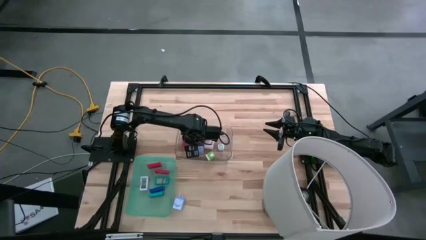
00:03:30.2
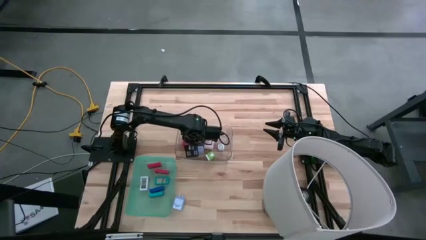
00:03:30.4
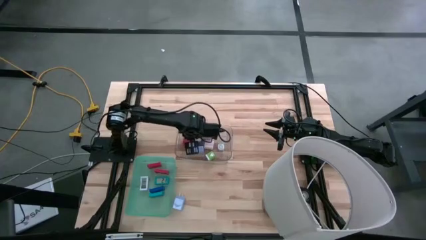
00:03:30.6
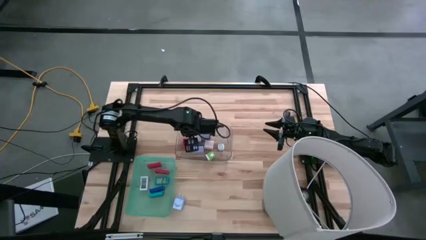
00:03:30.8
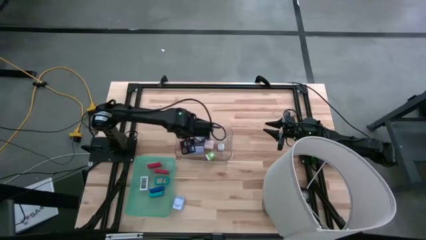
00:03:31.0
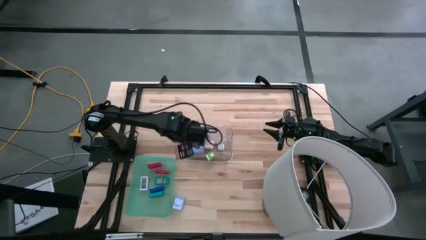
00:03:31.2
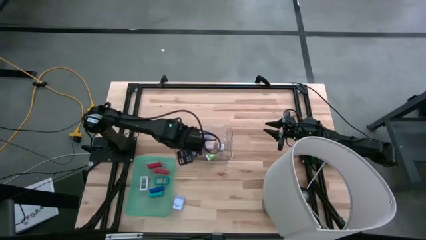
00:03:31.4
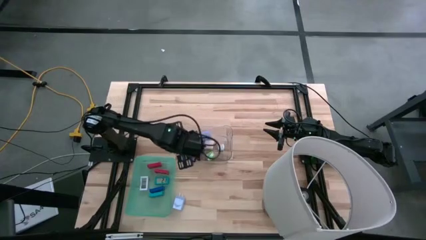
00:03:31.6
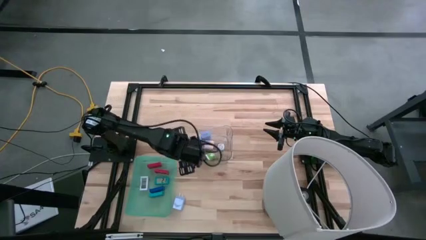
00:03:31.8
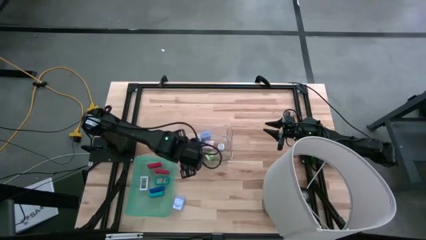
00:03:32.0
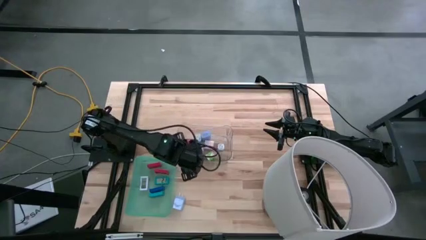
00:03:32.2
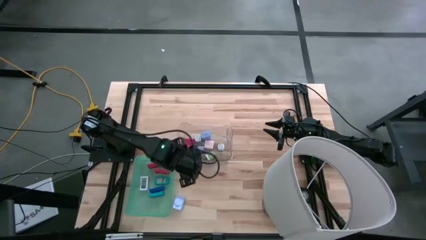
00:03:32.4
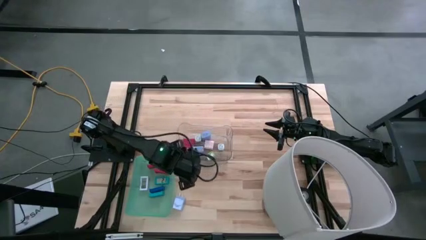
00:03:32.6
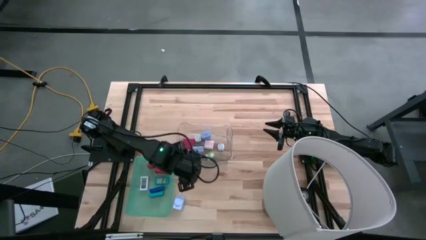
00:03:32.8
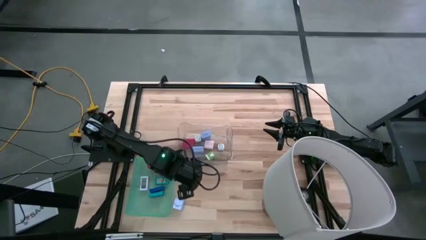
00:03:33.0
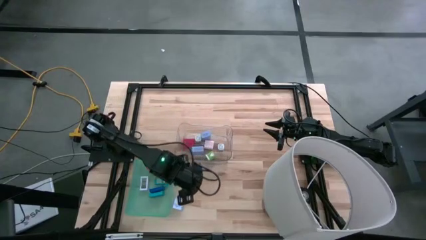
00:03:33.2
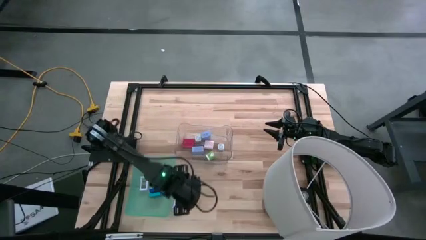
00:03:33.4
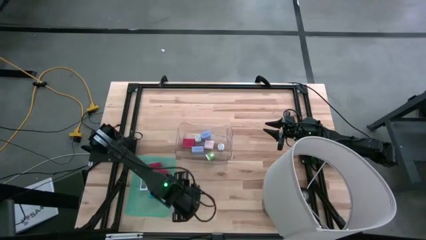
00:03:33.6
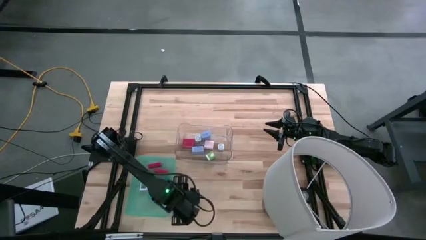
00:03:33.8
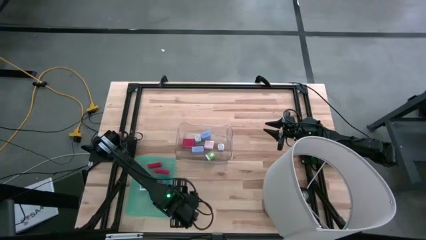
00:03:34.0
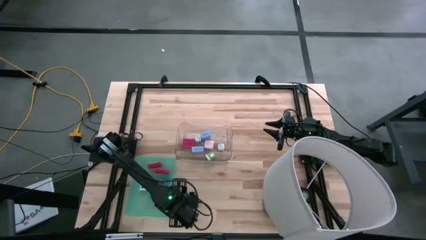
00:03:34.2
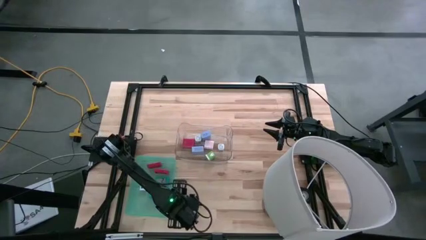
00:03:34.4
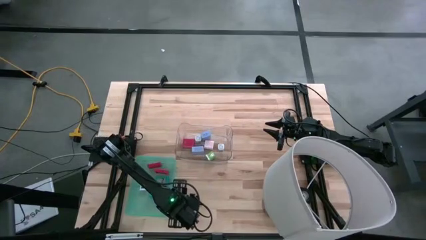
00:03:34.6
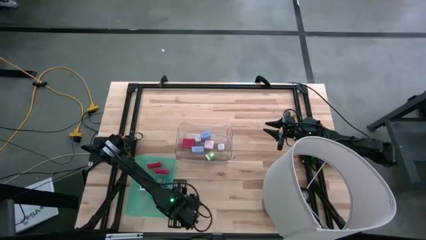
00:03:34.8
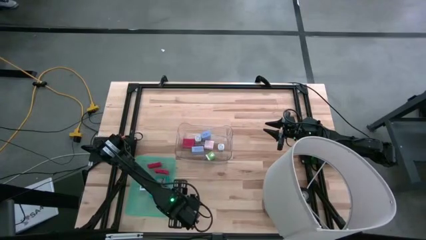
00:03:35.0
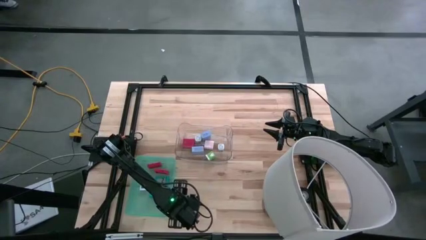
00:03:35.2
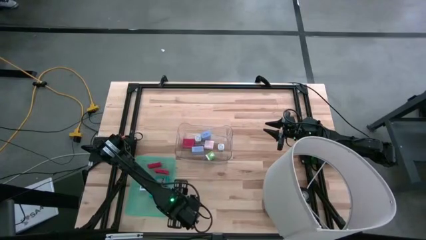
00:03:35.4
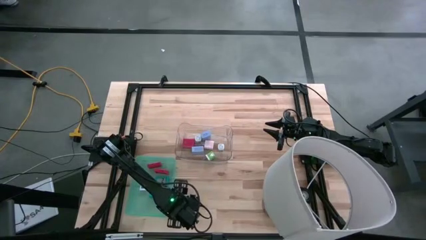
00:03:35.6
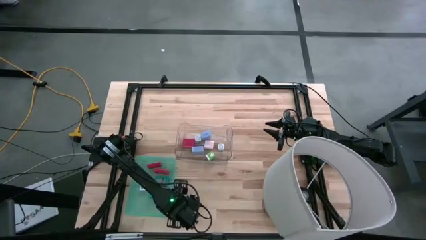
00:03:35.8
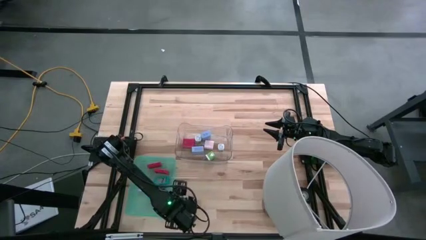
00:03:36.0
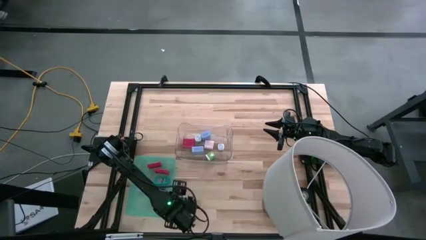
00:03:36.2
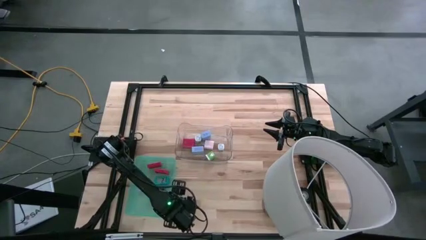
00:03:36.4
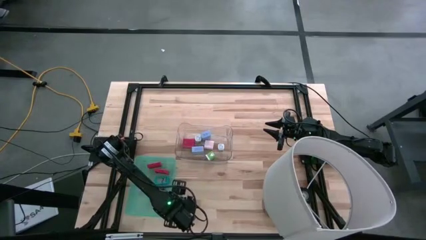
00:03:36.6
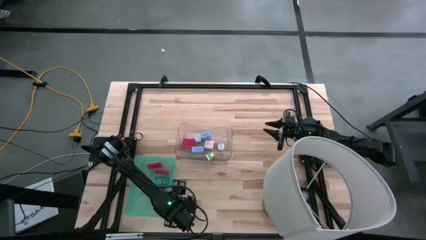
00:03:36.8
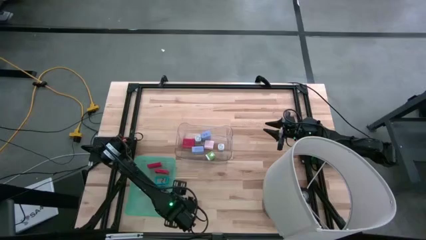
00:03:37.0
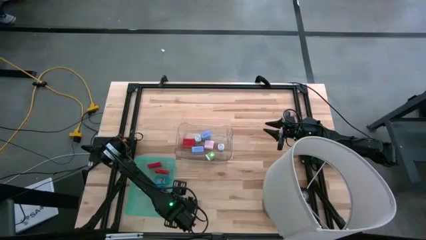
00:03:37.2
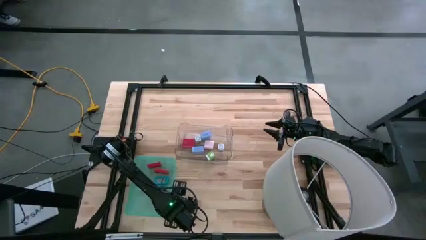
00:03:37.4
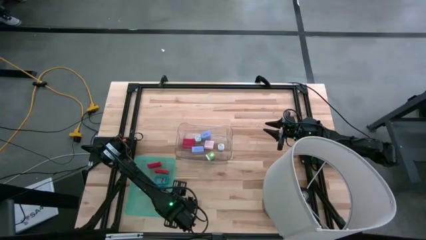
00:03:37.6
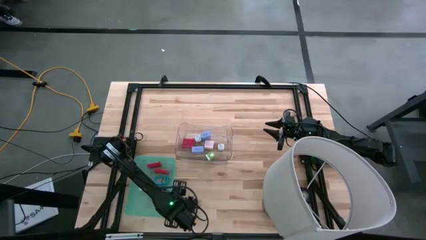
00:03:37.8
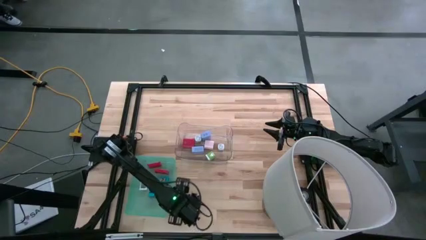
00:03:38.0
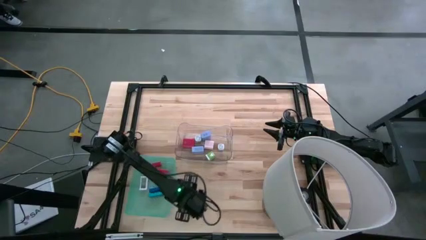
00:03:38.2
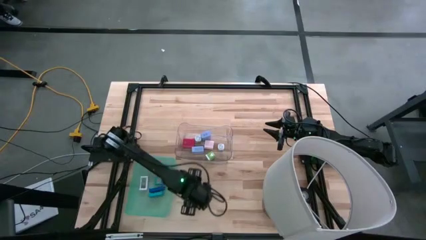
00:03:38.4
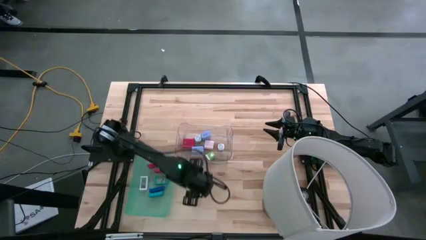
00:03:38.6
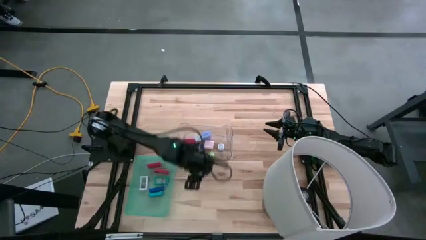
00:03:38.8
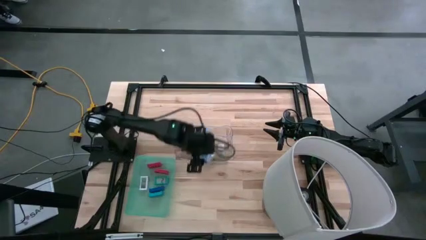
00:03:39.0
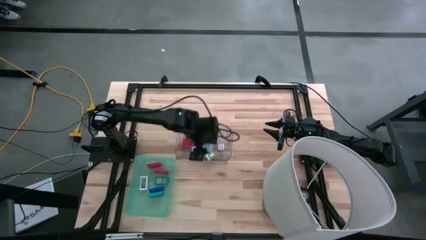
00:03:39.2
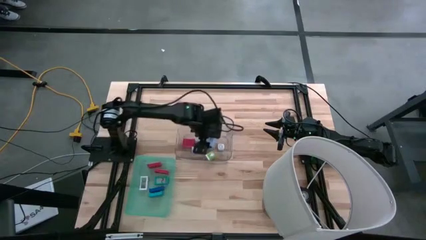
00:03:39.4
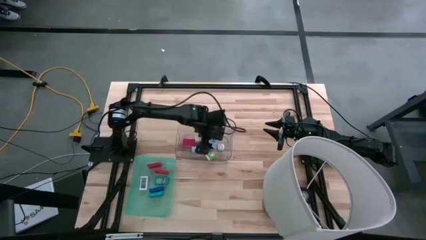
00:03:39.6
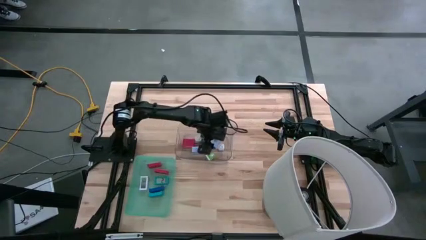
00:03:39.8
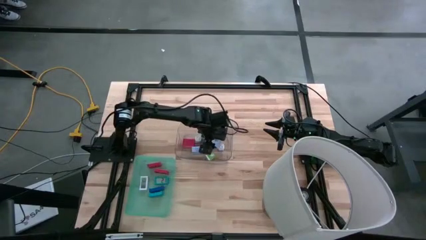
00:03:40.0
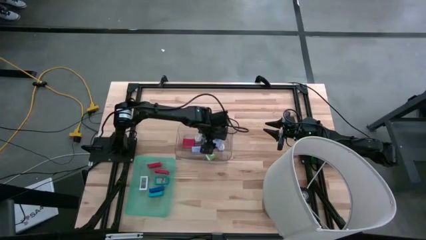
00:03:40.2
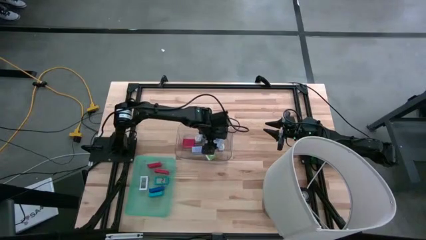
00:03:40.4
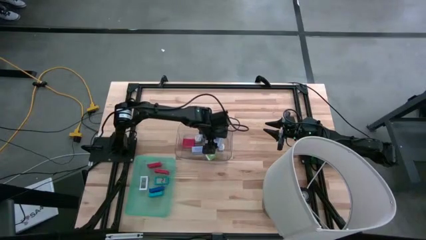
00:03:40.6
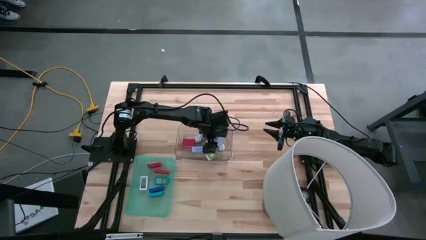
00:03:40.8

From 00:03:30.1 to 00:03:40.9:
Task: Pick & Place Office items
Put the blue charger adapter into the transparent bin

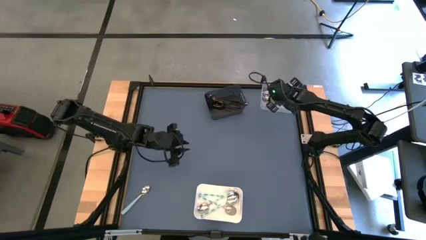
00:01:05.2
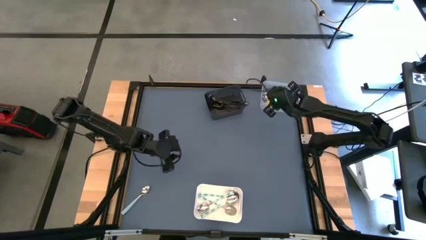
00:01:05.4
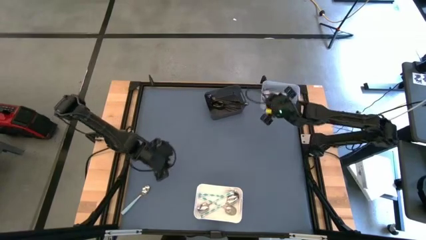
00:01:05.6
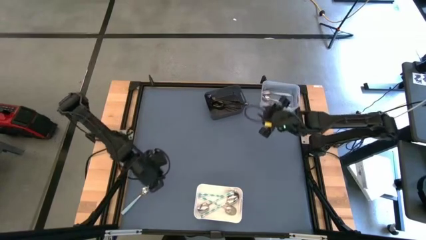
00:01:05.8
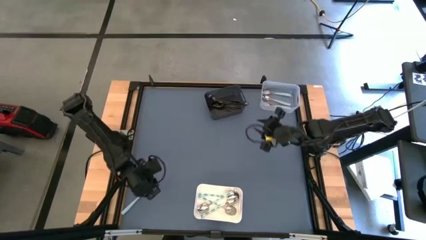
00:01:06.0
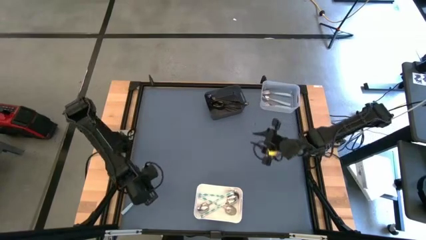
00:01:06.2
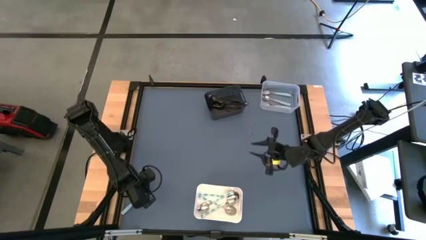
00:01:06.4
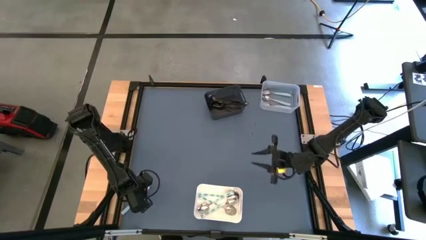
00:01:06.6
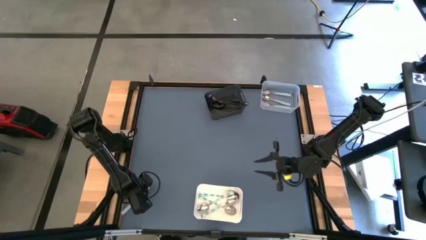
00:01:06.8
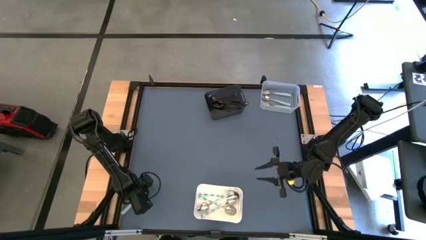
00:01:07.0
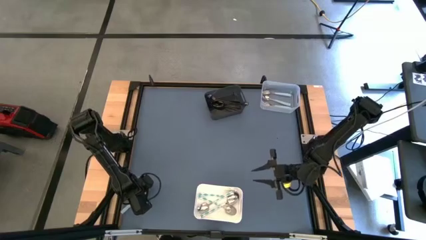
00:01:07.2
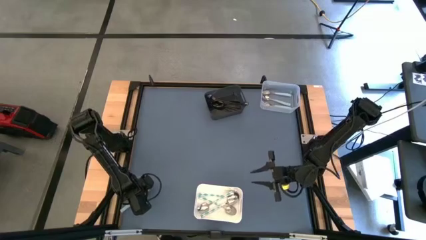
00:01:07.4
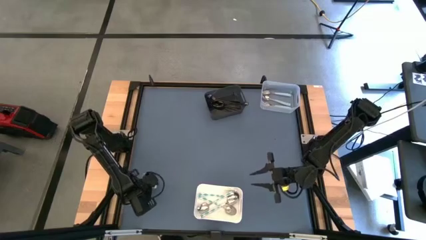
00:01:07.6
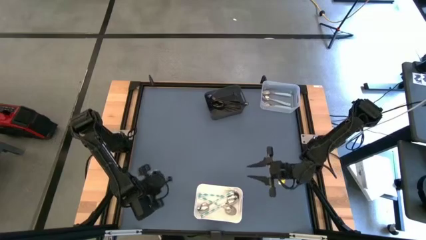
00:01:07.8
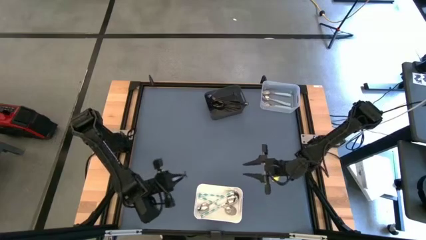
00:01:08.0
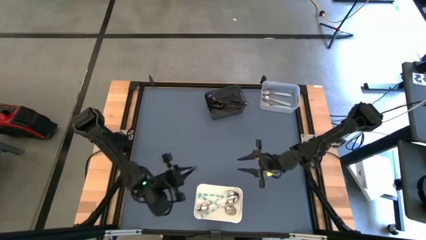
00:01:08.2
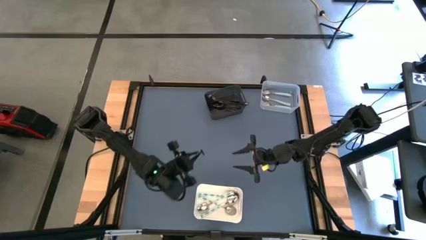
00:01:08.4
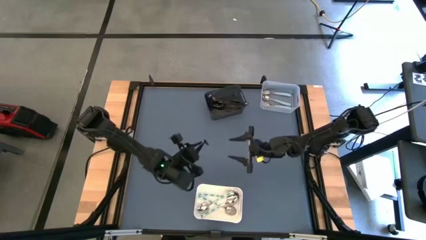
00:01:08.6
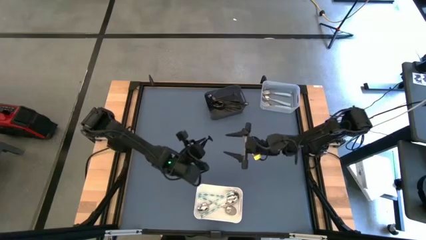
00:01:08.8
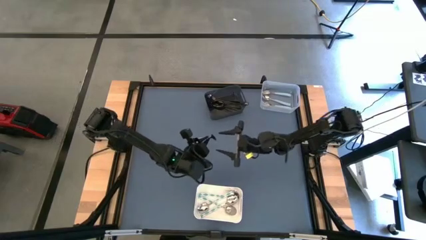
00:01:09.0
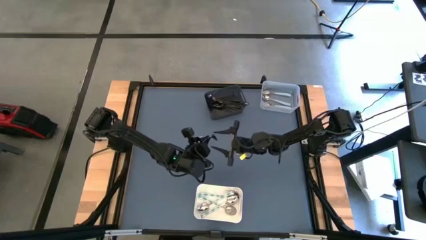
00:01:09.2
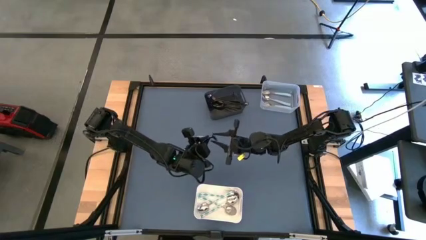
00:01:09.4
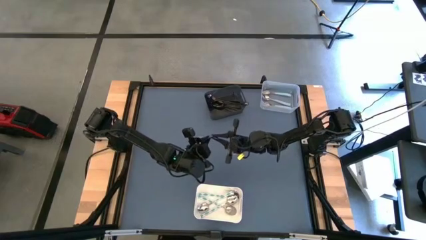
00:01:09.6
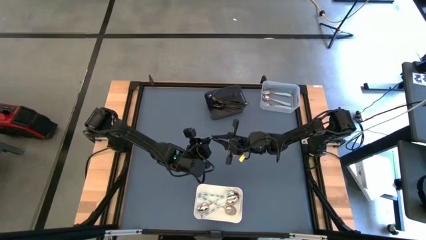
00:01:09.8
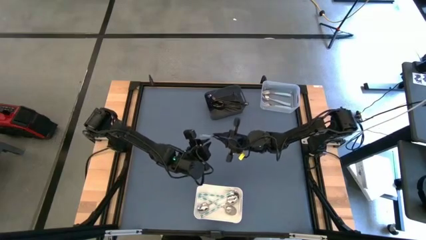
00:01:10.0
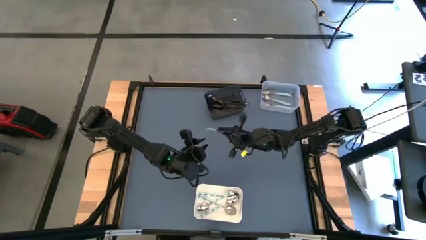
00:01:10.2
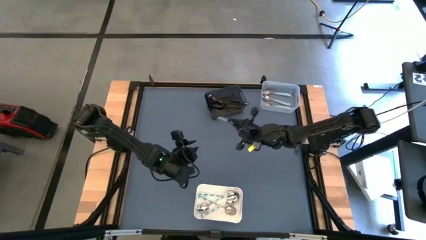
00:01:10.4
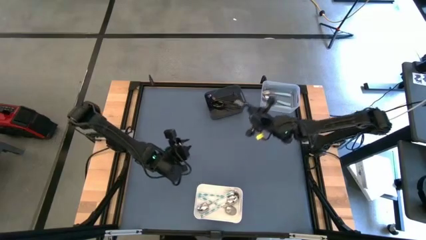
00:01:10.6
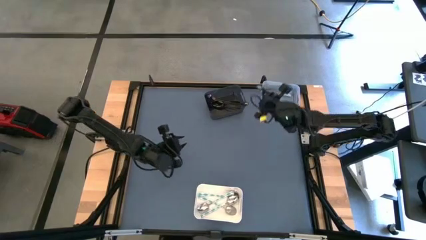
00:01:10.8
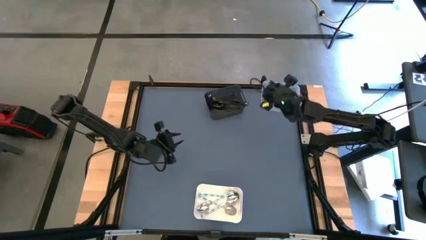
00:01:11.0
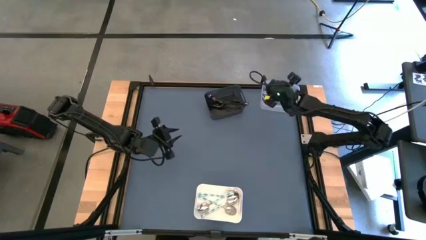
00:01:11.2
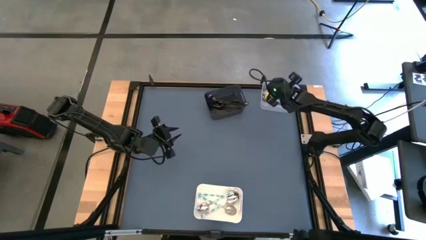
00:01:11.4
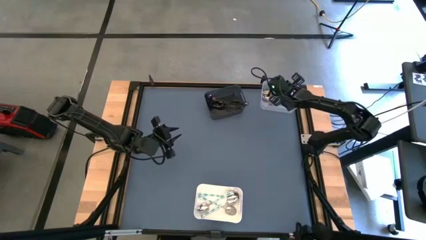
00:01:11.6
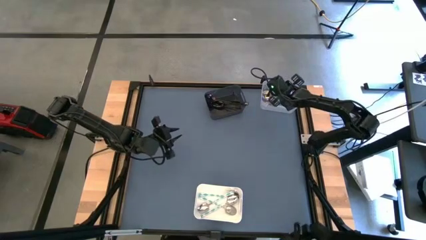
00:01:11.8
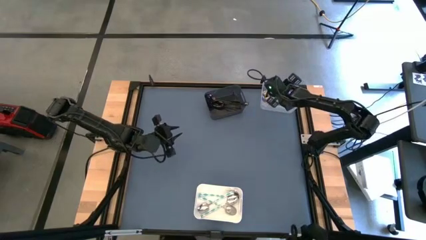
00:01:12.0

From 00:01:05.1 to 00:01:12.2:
Task: Sort silverware by color (type)
Put the blue spoon into the transparent bin
